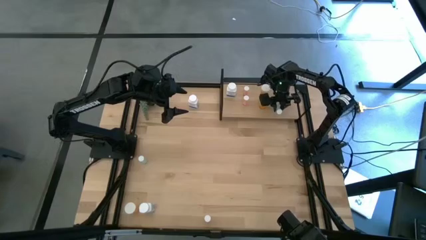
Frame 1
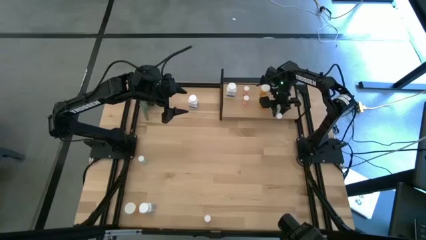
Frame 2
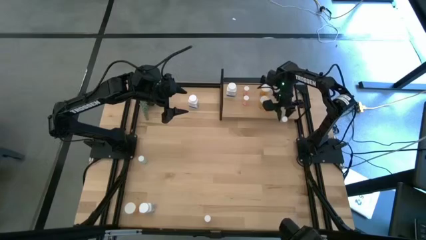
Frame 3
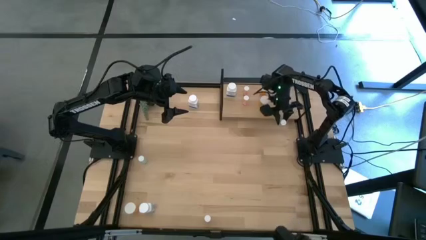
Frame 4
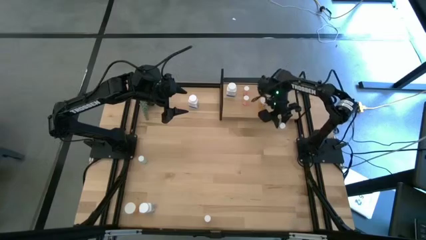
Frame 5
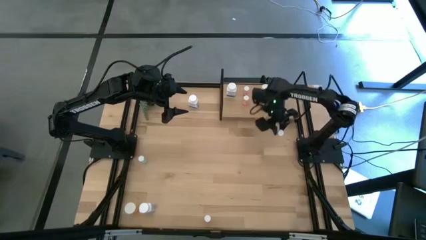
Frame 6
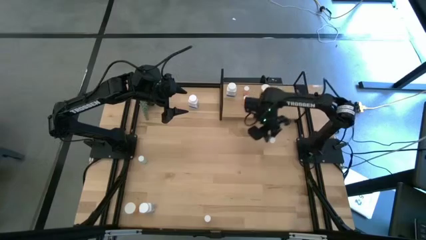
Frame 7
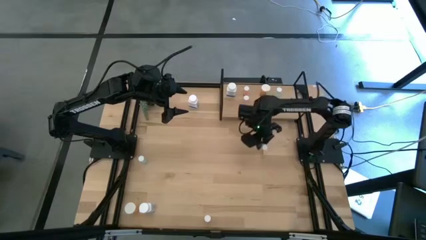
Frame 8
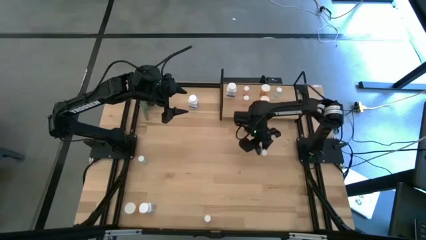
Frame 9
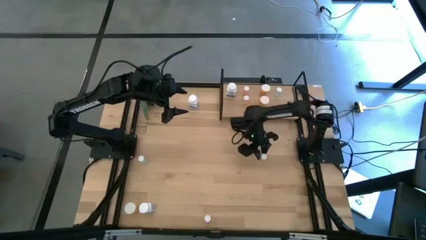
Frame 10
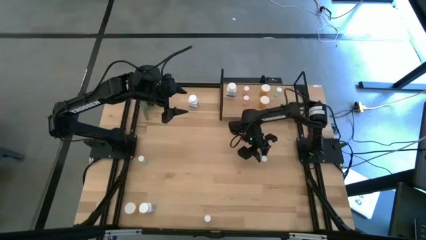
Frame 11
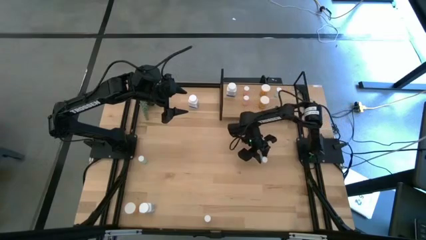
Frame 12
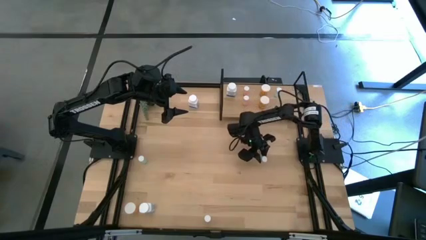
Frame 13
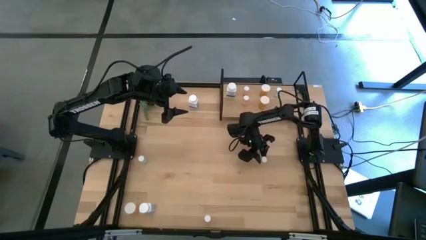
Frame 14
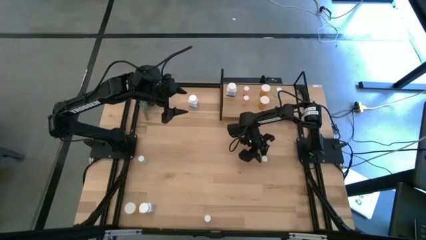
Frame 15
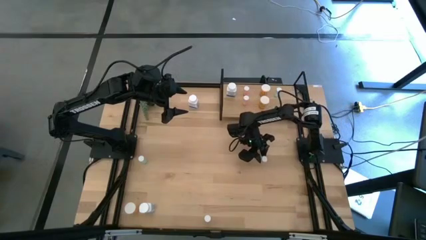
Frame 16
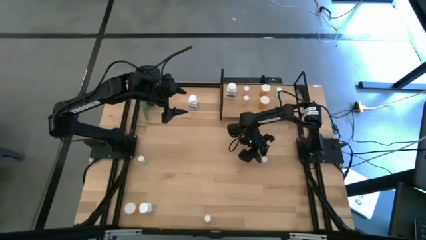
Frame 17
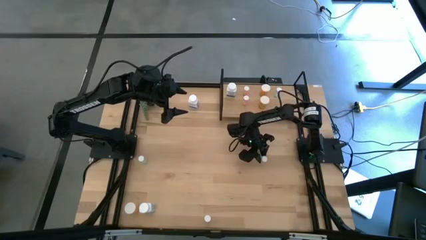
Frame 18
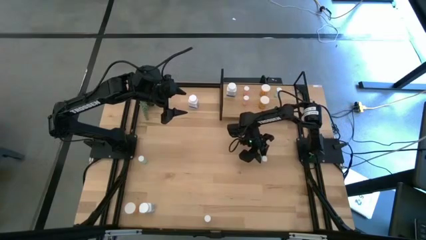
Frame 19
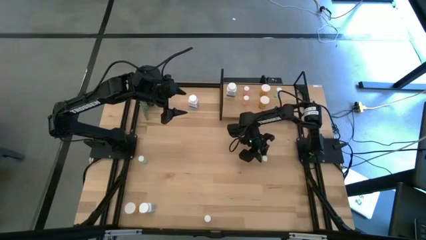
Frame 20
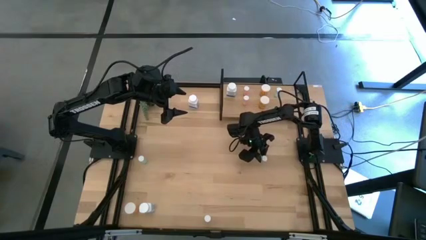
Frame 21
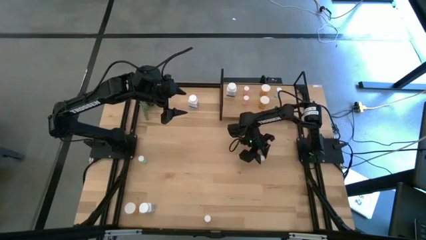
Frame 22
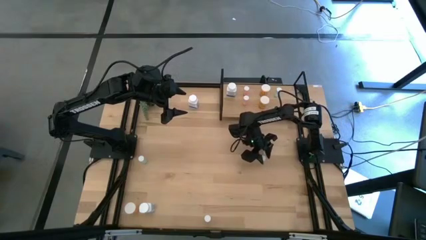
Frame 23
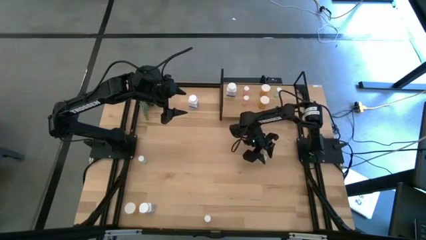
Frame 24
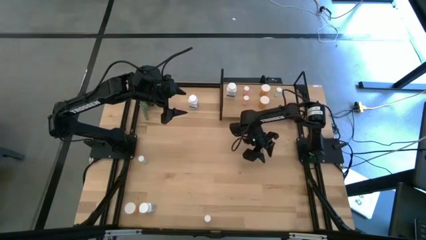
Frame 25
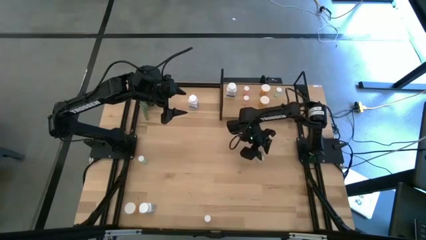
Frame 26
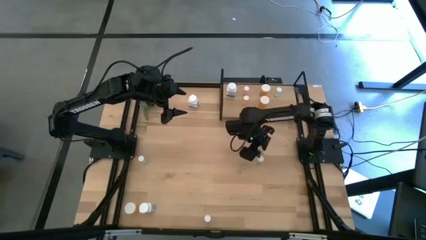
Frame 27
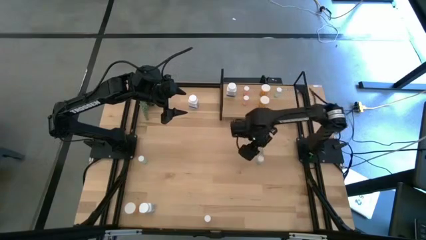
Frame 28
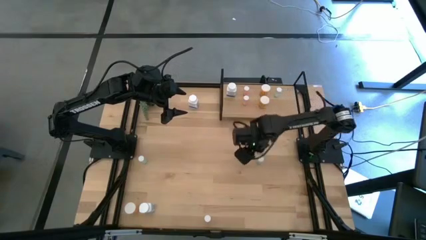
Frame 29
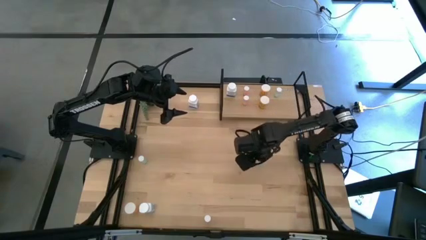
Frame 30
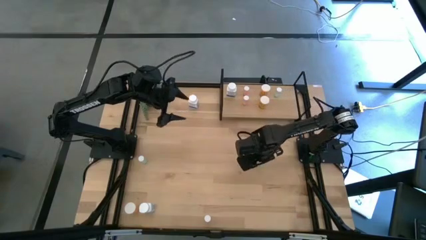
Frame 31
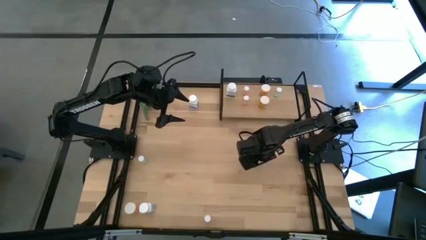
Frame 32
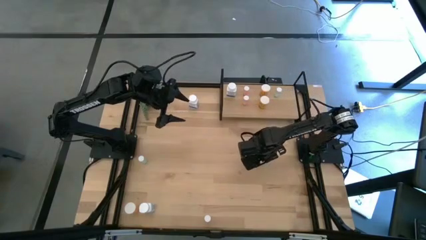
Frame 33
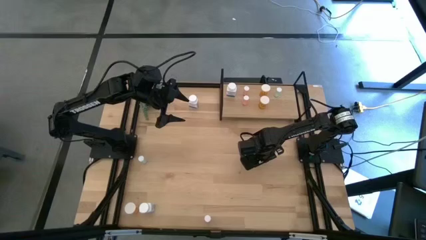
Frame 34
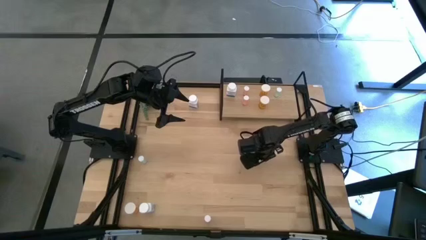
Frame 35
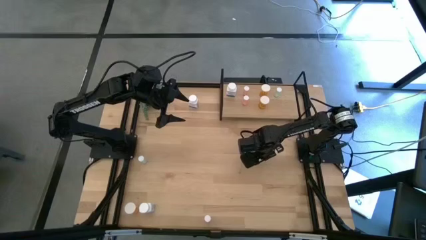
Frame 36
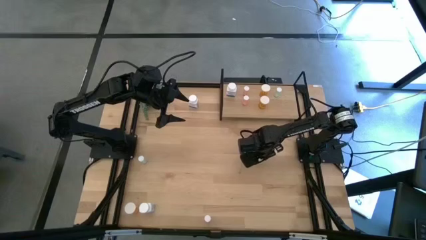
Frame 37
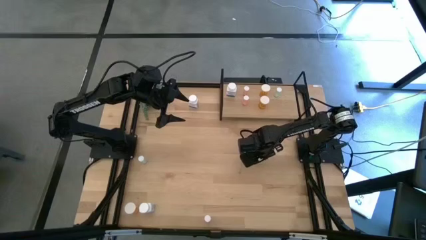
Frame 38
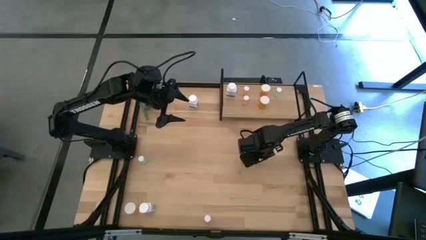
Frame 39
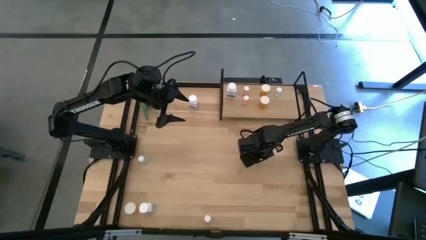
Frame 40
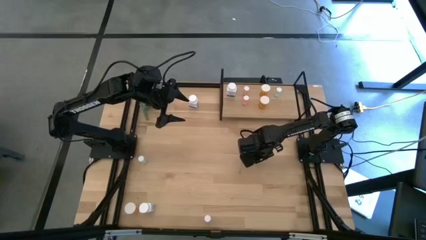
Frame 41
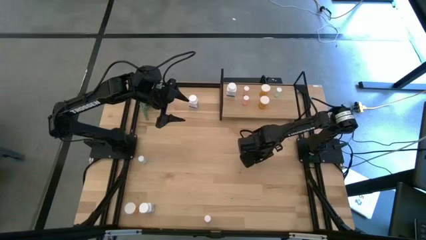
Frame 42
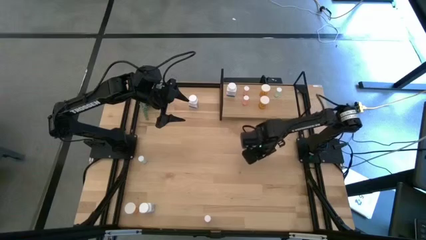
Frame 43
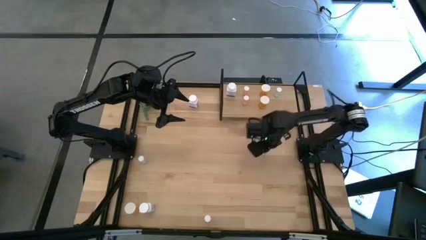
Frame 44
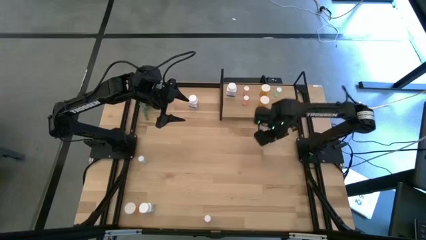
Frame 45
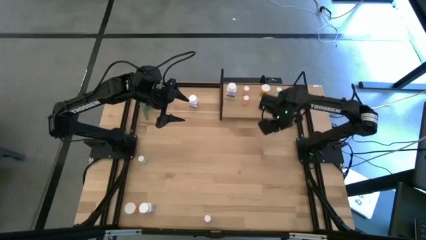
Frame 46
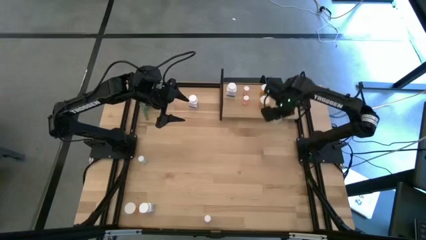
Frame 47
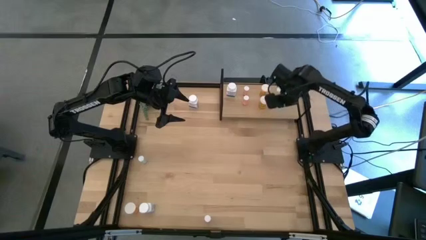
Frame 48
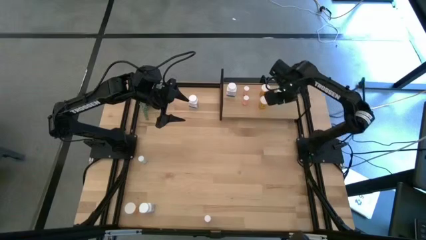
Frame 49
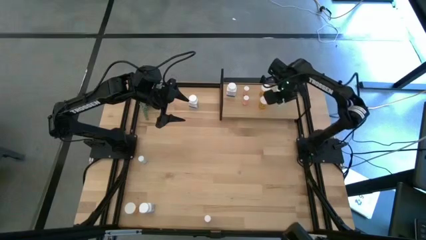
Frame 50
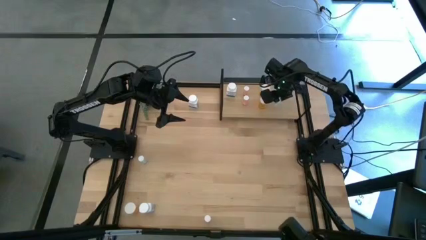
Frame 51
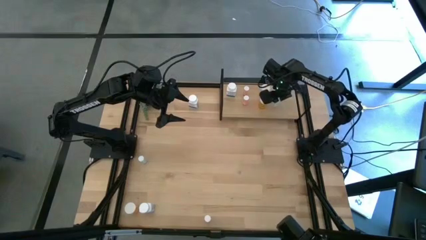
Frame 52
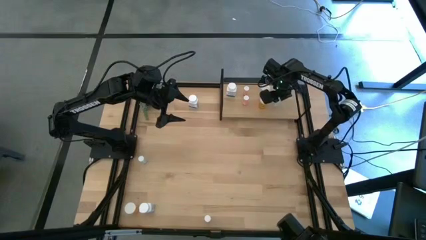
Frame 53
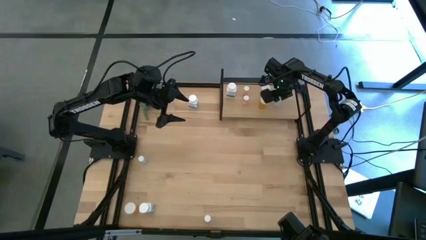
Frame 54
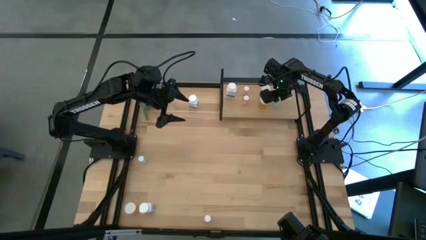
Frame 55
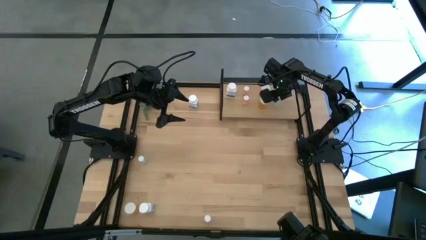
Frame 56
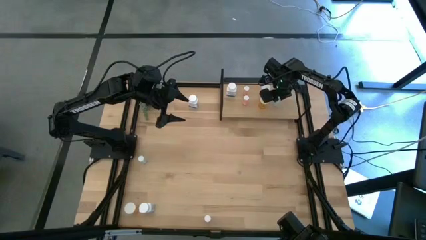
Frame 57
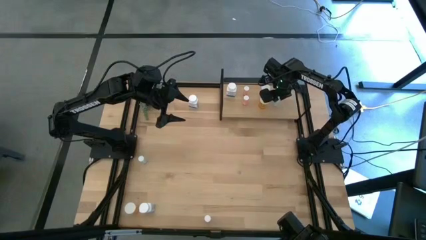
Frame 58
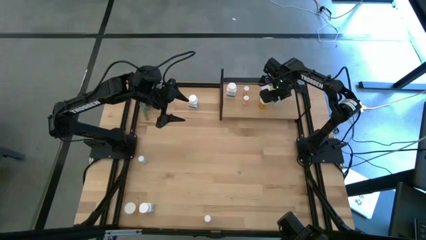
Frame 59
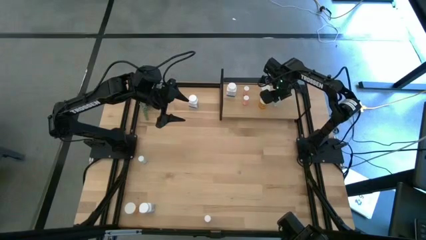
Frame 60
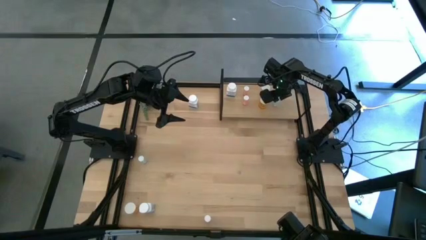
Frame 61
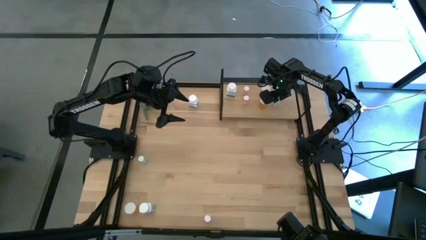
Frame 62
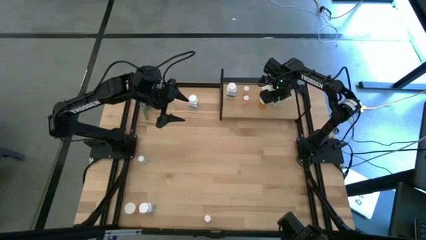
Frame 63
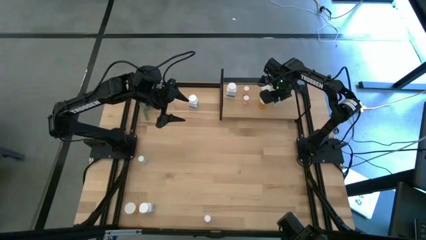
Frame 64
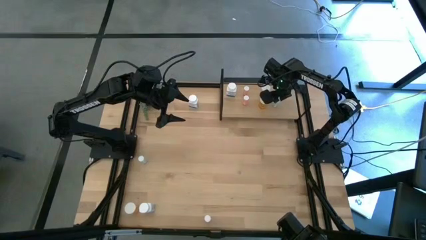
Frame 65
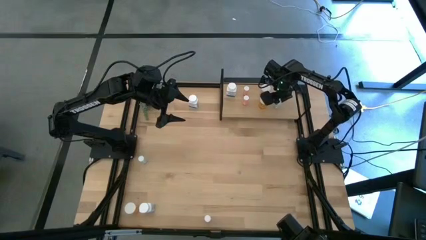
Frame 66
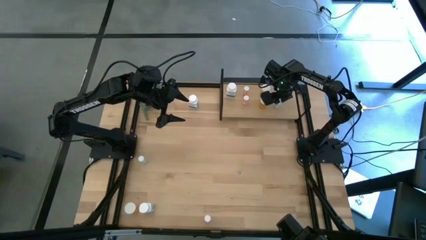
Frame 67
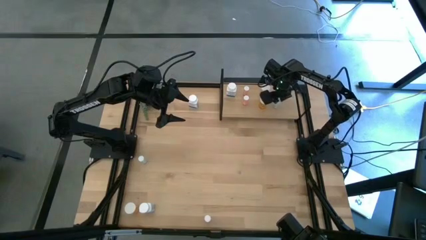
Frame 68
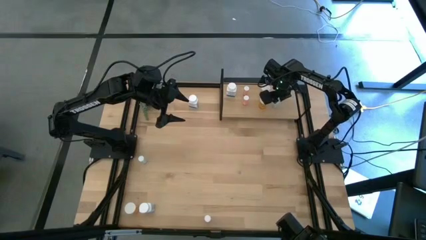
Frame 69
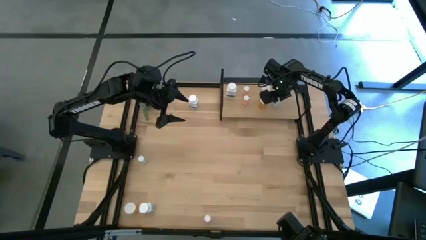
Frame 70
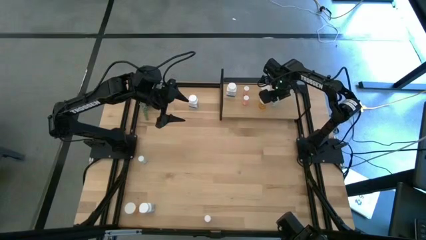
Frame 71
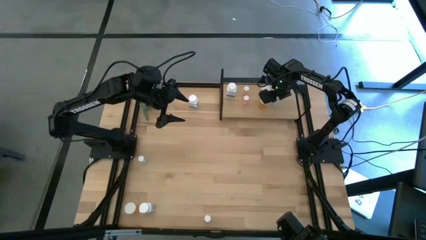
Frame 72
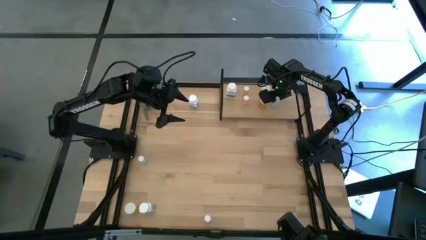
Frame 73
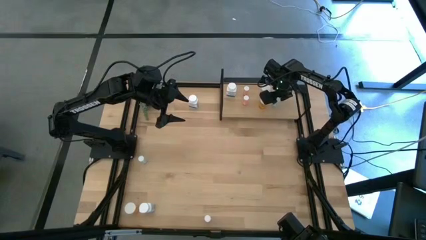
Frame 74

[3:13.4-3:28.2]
Task: Pick and place medicine bottles onto shelf by color
Put the right blue pill bottle on the shelf aligned with the other blue pill bottle
